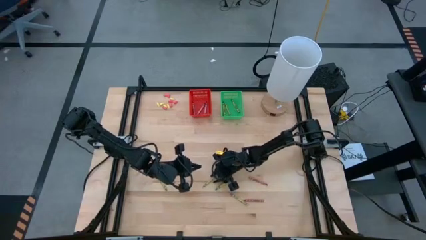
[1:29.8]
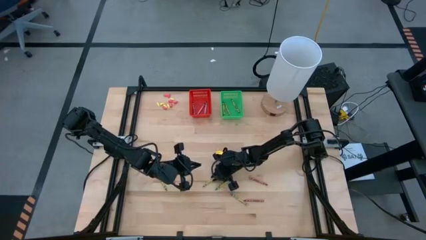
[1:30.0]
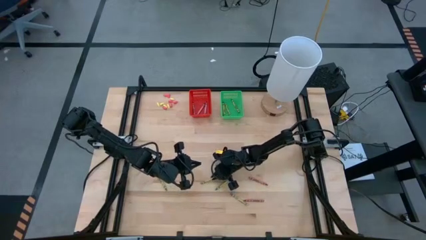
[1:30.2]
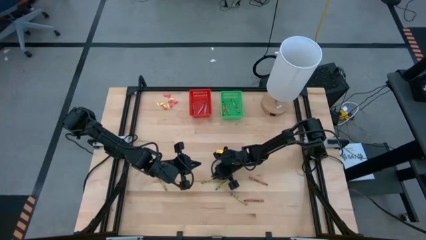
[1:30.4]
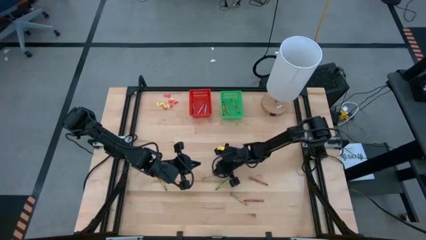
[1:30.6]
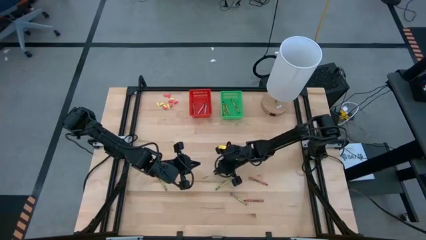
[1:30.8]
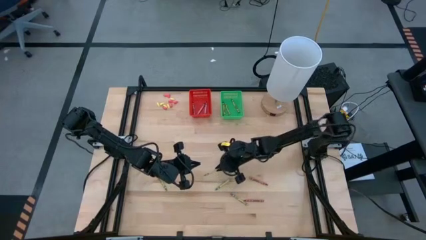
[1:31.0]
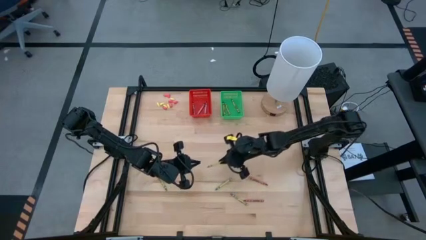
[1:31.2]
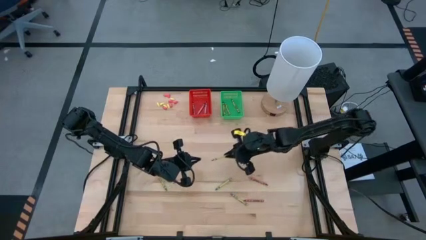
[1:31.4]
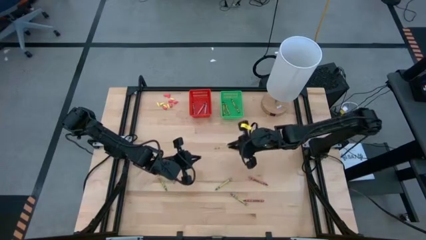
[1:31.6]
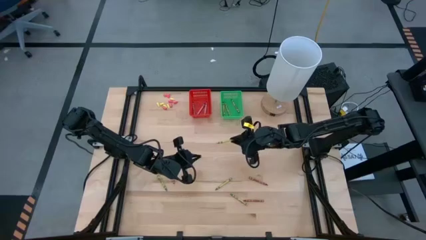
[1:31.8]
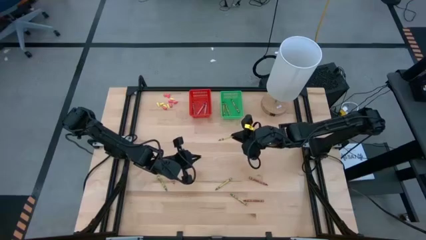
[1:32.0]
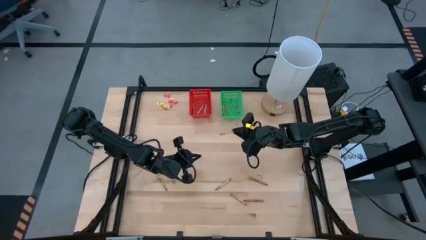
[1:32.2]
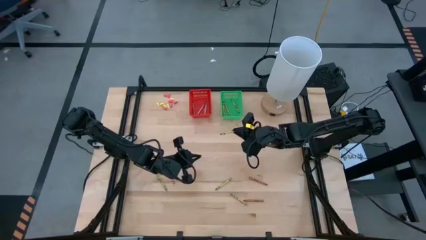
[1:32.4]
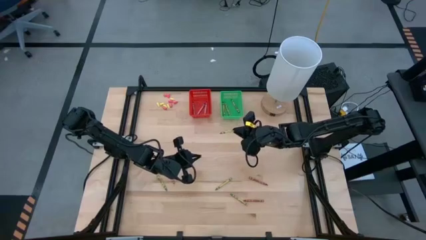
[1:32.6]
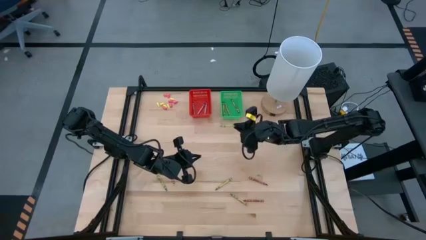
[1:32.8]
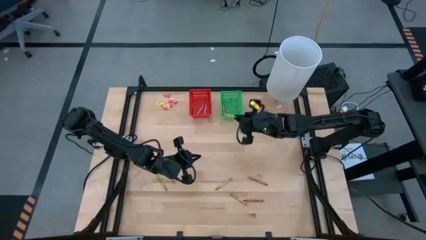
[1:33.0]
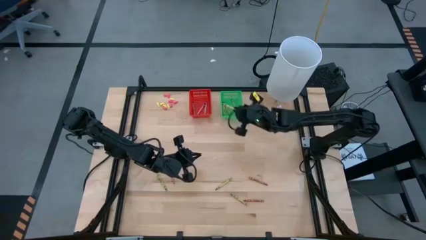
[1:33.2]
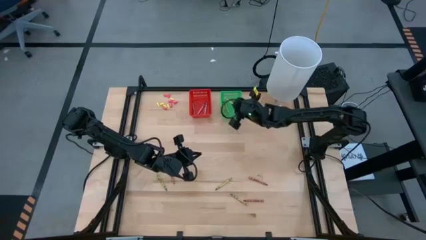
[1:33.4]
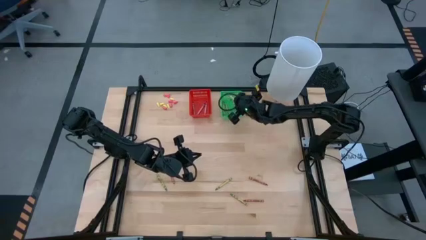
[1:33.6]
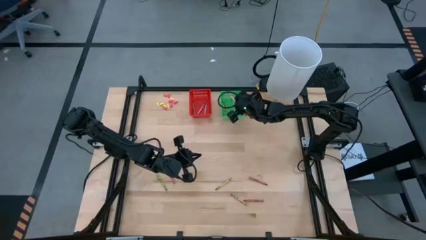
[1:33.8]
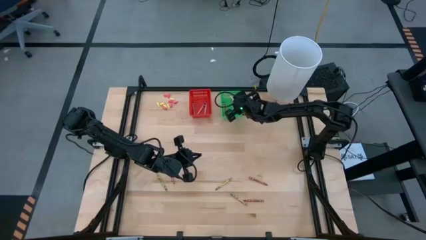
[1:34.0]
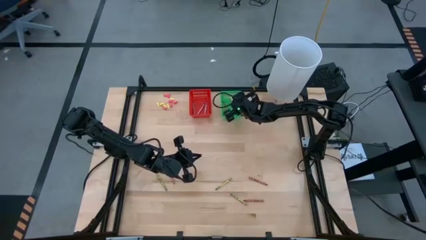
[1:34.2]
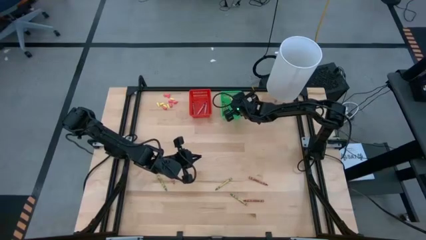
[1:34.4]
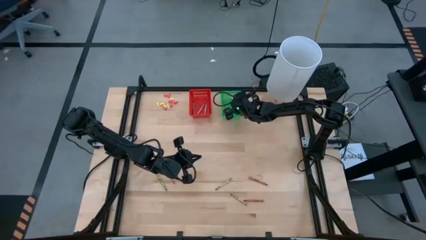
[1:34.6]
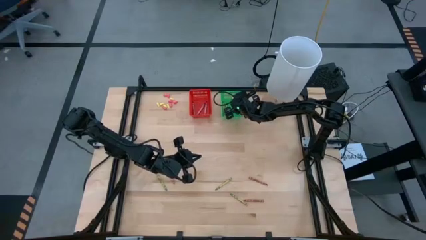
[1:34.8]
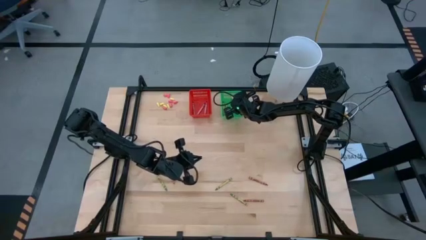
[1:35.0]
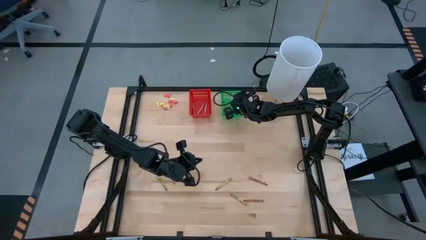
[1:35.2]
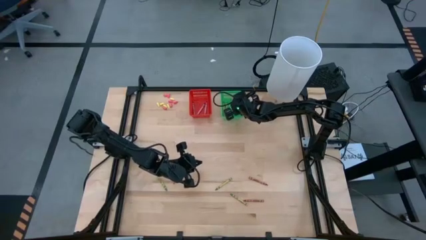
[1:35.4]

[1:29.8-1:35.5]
Task: Sort crayons
Put the green crayon into the green bin

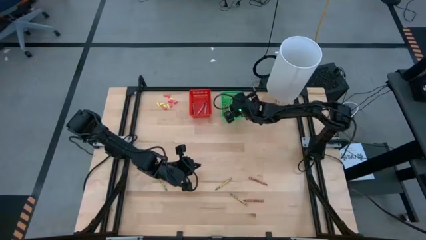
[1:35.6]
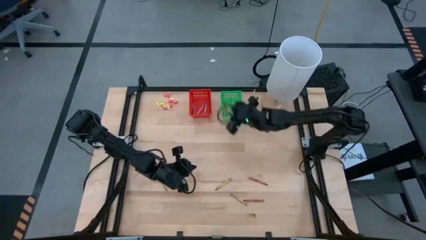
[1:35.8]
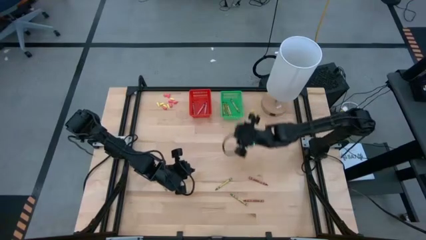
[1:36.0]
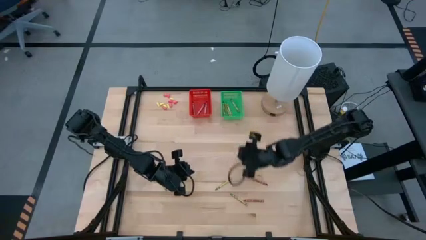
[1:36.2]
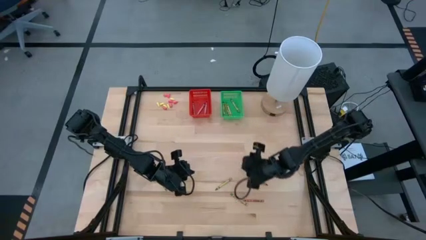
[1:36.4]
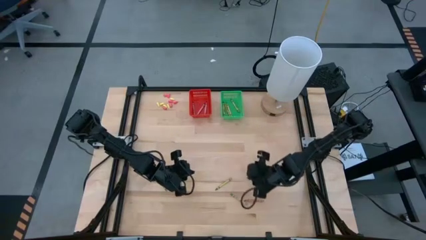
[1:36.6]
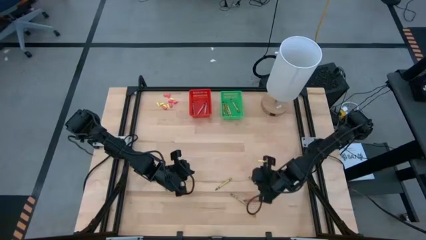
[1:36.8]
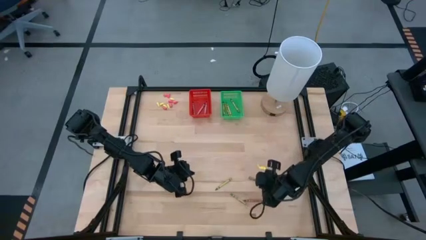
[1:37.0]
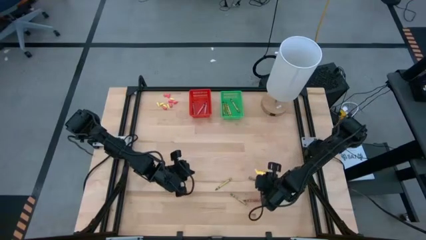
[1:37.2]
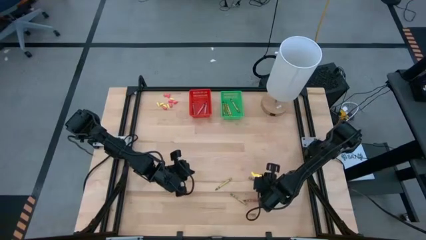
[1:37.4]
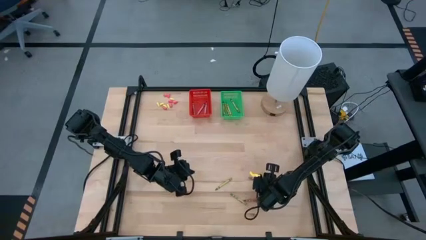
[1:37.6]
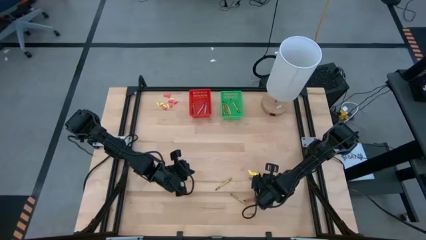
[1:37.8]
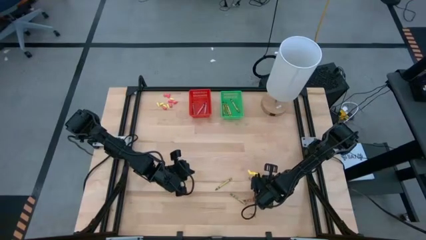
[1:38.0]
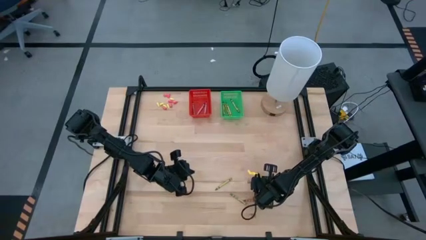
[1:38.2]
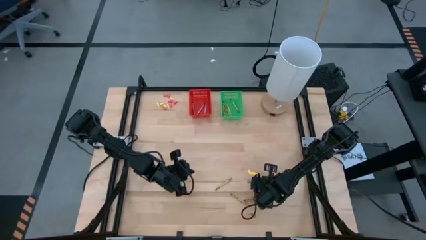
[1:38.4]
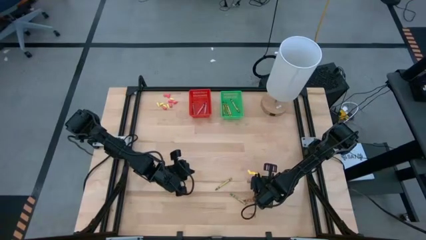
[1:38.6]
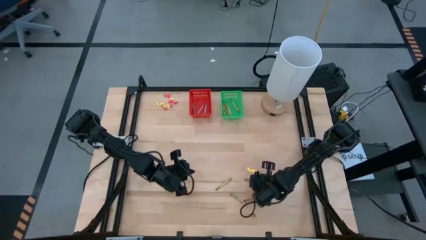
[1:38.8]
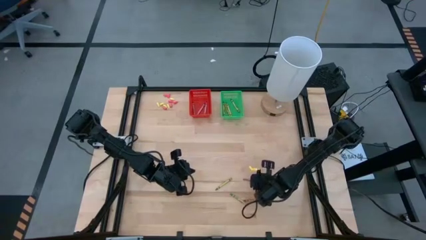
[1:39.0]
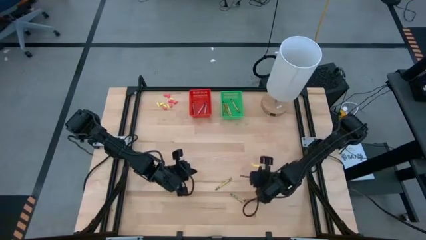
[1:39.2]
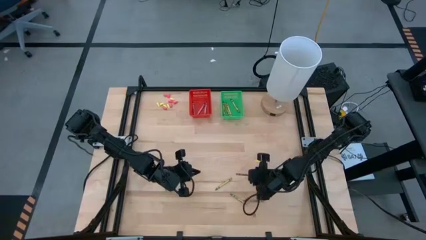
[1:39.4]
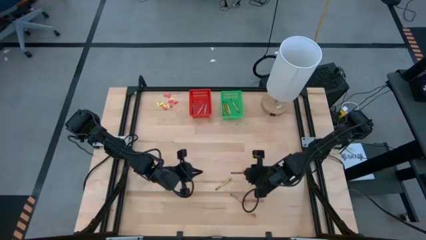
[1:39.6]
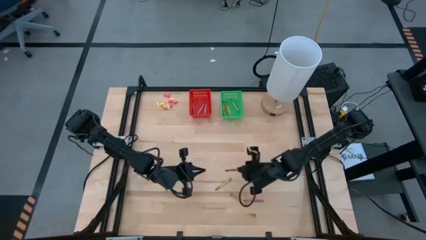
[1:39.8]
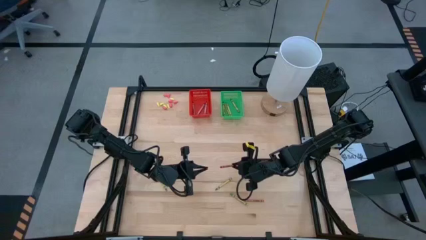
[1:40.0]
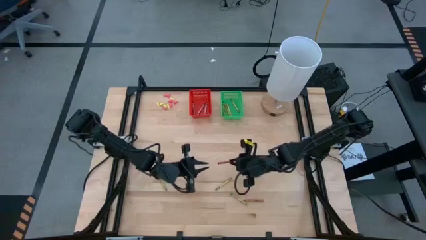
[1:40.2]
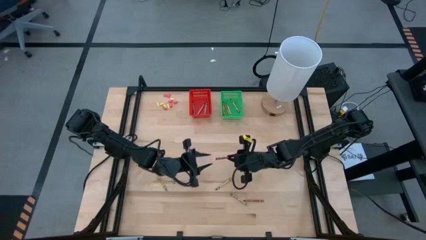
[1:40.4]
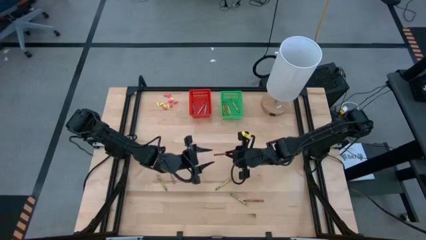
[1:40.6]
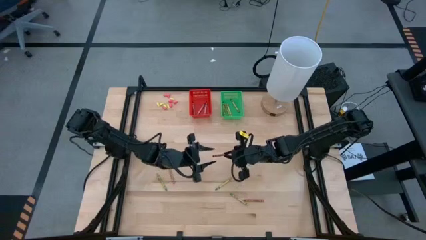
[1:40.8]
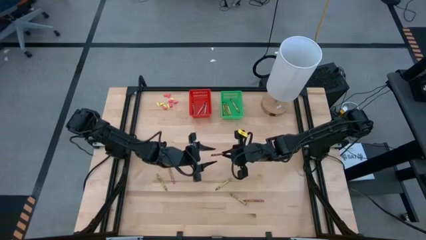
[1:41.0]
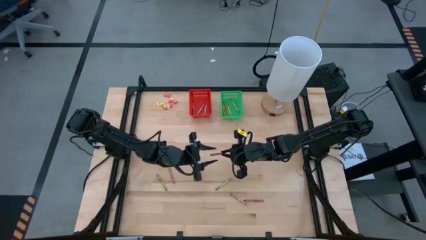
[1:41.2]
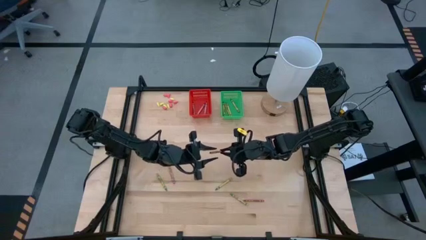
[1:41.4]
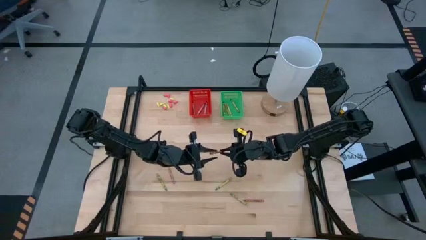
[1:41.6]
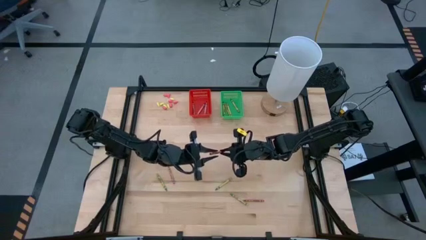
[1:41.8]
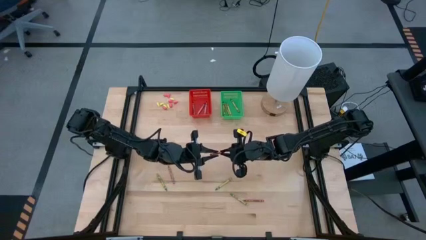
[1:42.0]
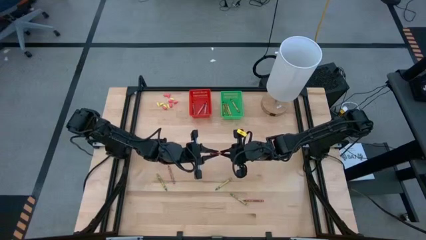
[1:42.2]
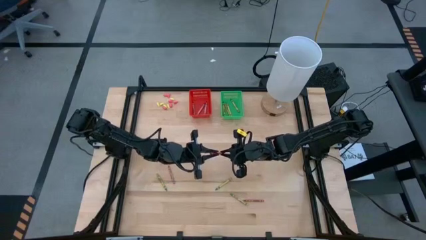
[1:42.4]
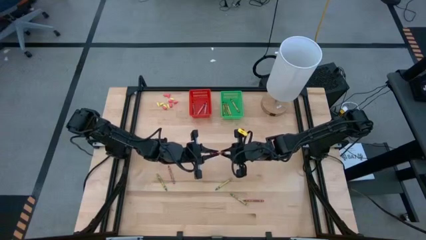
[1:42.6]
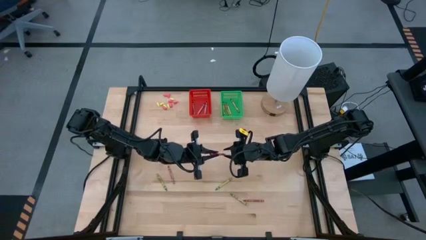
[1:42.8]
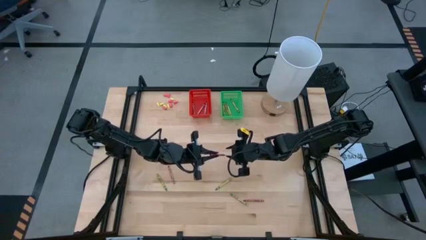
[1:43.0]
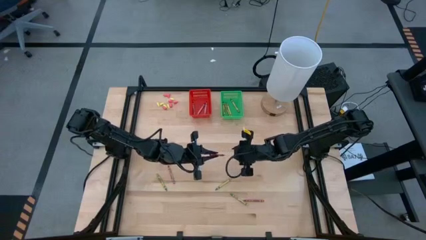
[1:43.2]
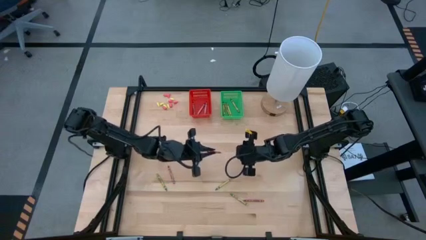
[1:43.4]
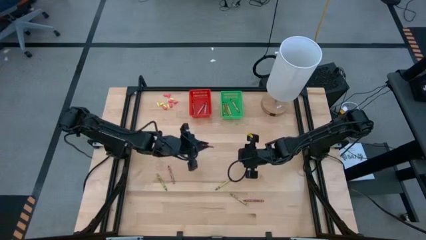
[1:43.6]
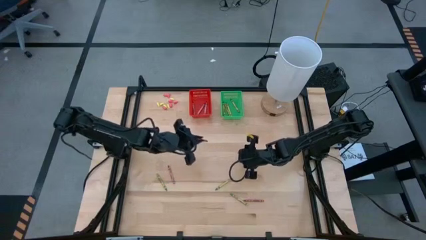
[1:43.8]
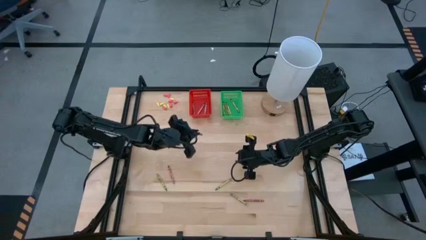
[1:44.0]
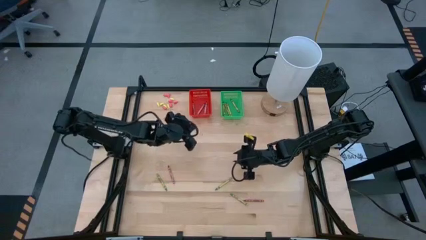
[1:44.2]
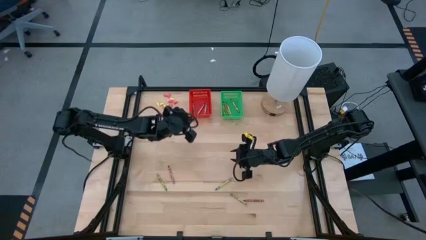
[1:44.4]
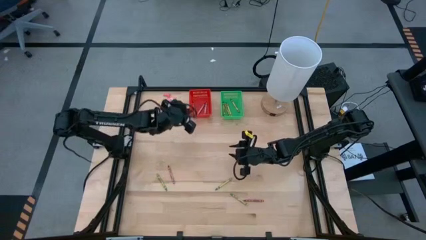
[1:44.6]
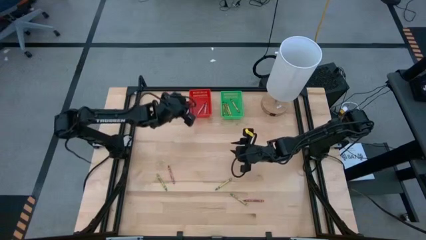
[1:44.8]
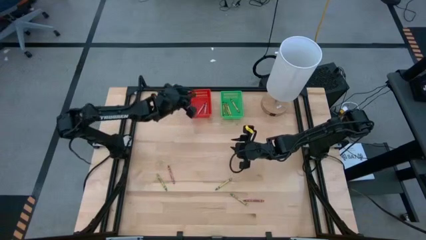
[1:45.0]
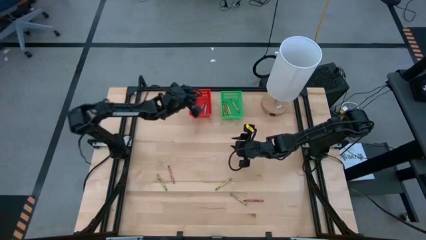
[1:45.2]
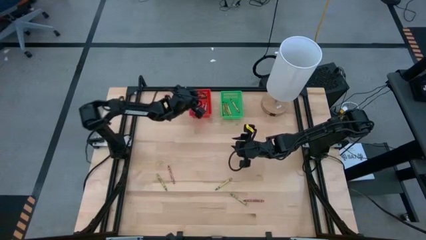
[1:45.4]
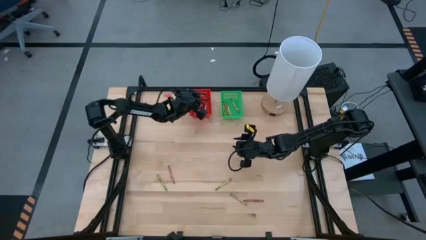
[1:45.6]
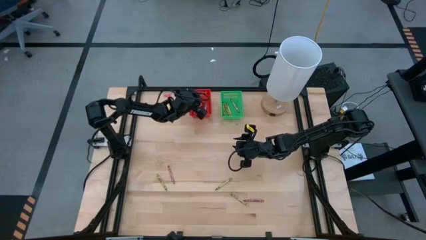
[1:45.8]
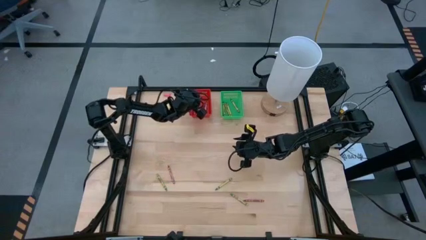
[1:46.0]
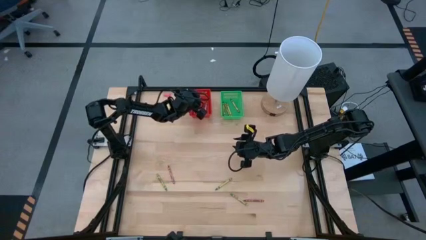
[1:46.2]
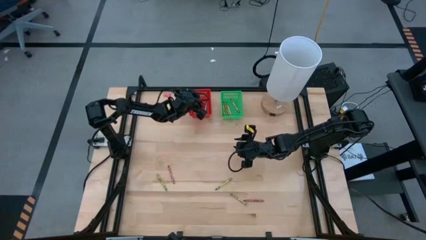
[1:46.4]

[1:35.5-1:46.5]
Put the red crayon into the red bin
